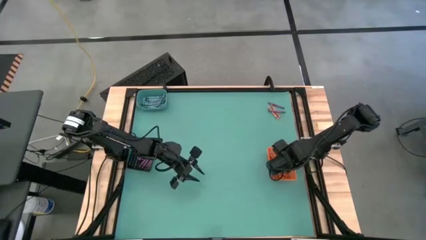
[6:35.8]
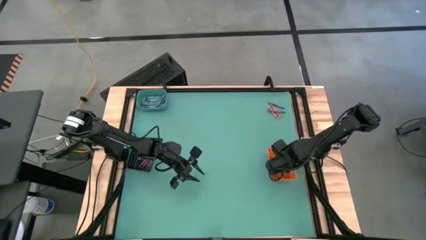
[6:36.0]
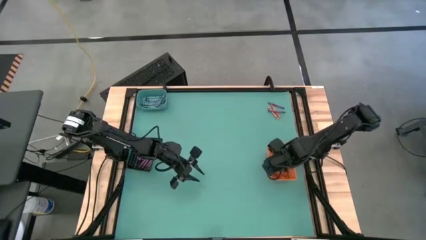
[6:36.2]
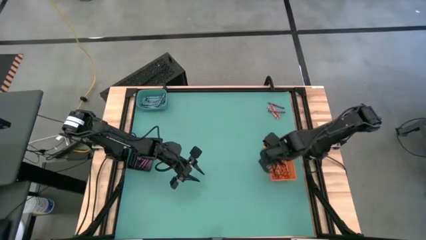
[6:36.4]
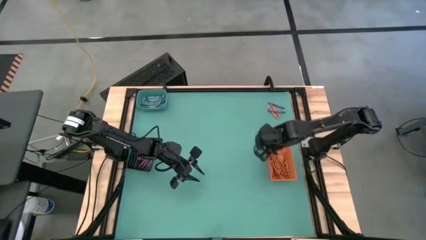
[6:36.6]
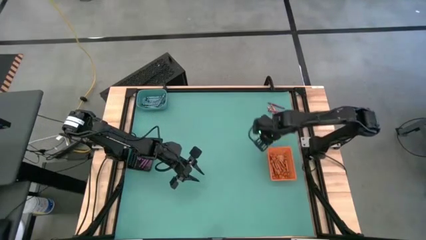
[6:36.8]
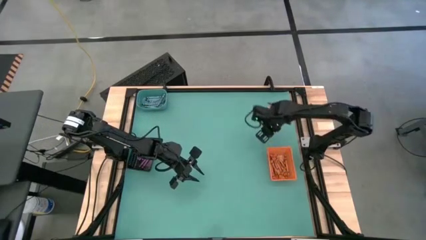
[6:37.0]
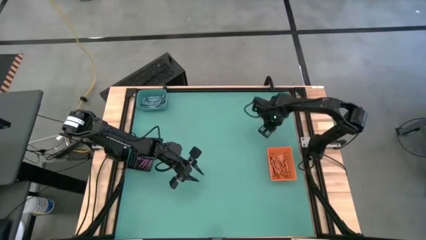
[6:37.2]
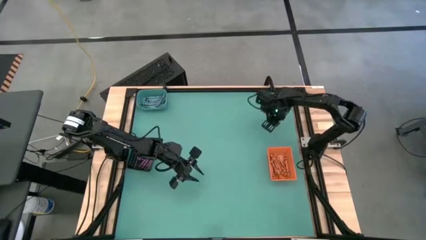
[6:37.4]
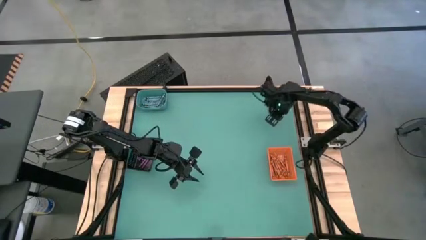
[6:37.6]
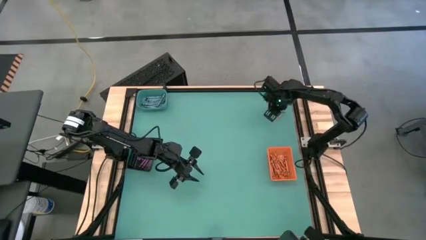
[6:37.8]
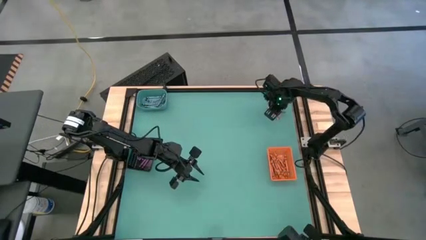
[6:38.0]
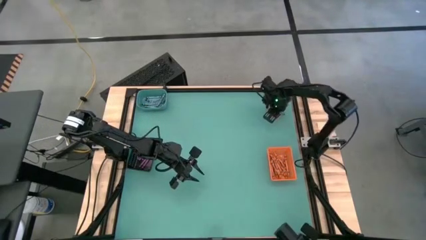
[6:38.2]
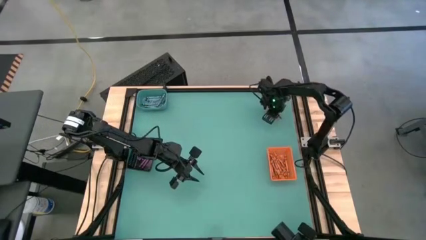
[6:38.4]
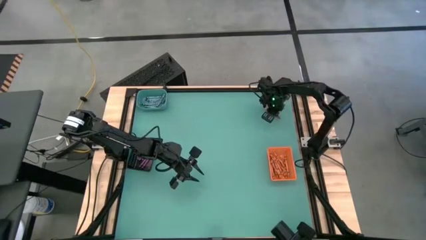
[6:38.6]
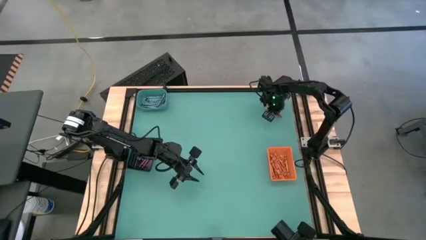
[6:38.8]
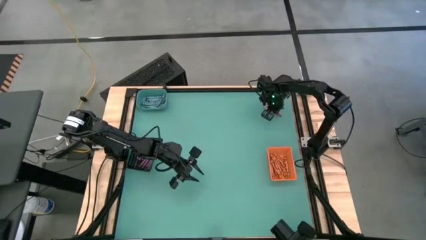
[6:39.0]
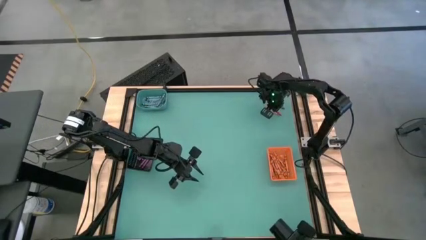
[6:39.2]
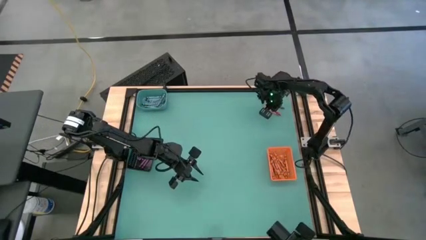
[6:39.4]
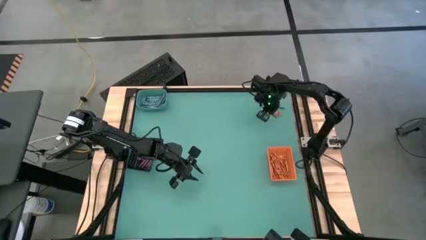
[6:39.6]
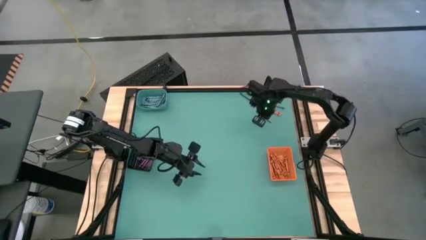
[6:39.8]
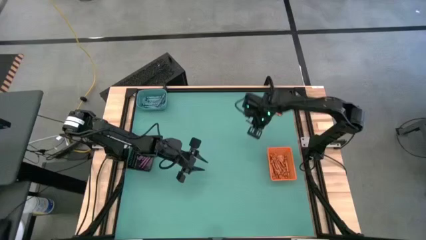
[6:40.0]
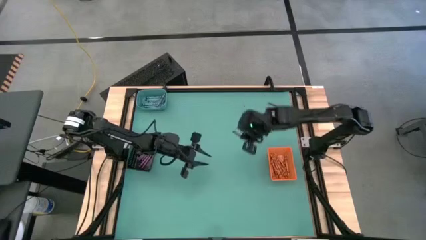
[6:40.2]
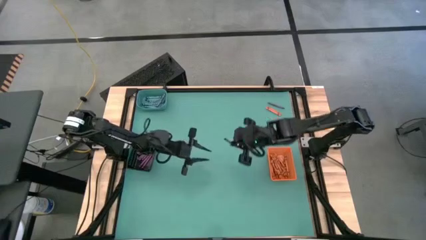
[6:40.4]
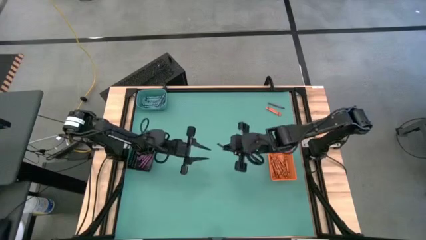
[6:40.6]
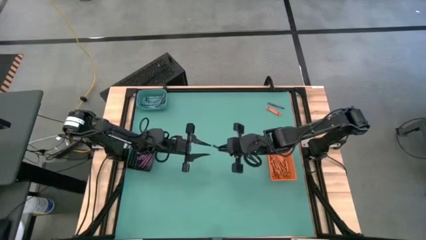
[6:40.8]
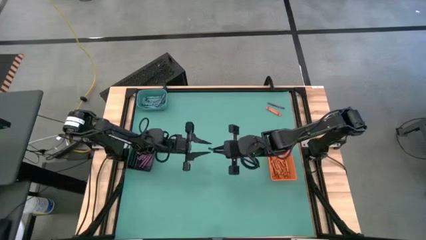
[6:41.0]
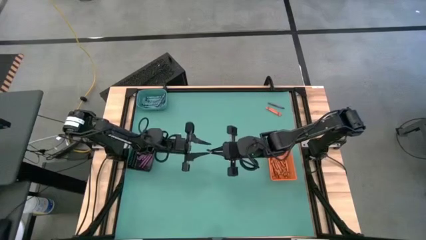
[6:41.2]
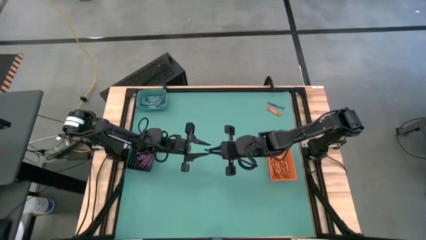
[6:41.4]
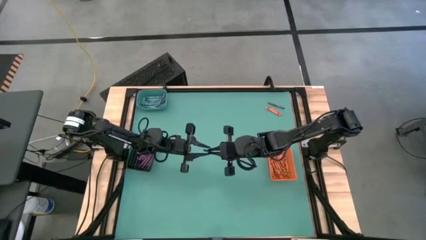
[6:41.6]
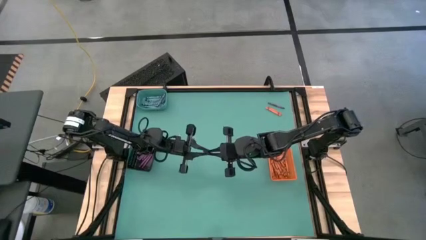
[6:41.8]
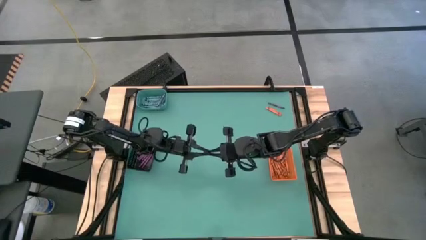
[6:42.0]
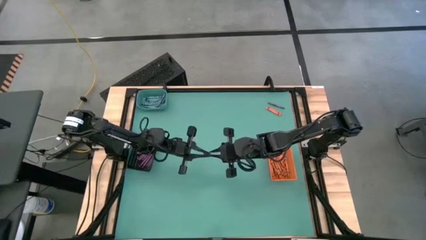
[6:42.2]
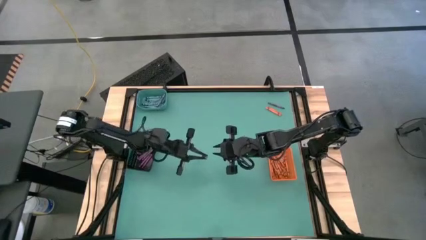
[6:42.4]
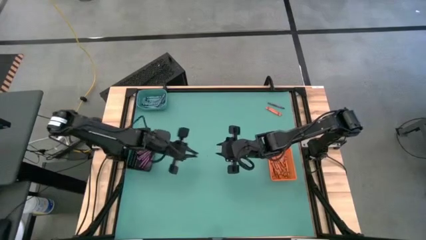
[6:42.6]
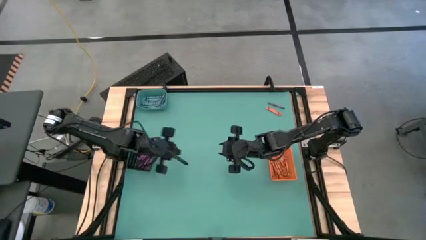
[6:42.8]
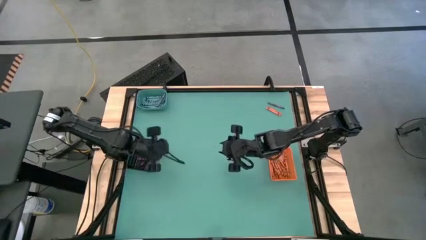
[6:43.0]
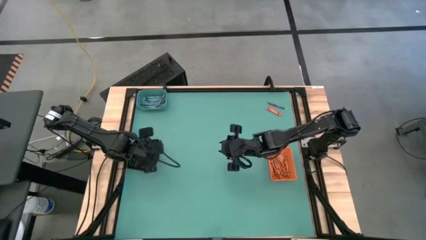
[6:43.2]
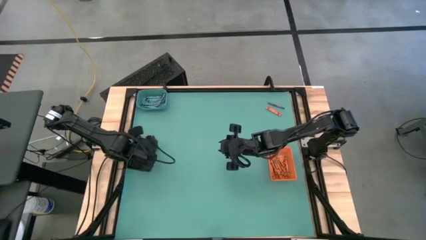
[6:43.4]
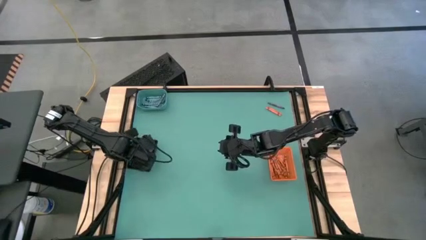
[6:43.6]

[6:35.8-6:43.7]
Task: Sort crayons
Put the purple crayon into the black bin

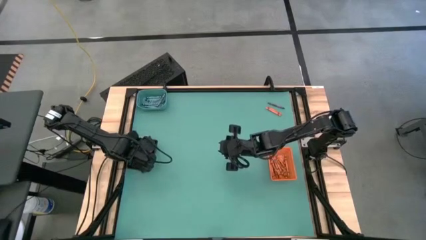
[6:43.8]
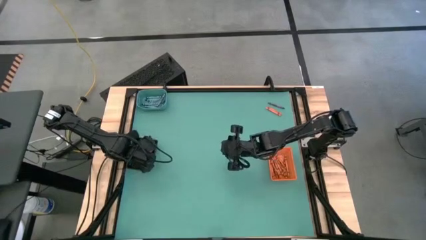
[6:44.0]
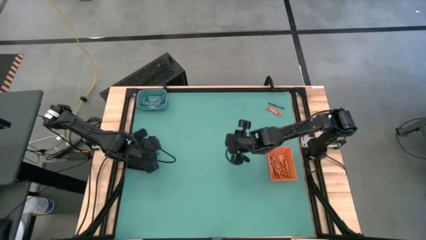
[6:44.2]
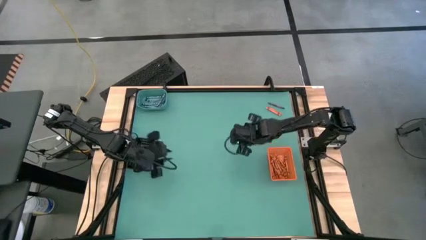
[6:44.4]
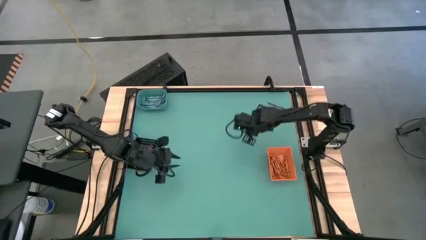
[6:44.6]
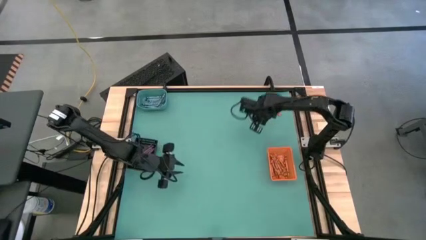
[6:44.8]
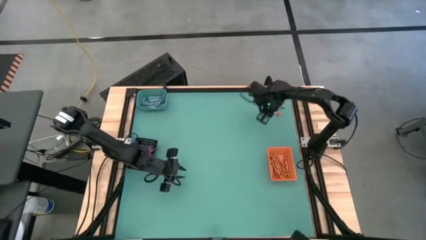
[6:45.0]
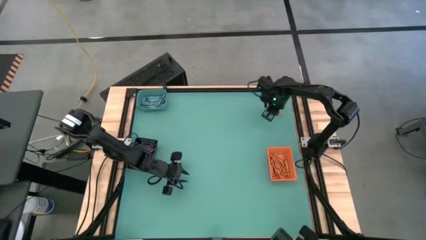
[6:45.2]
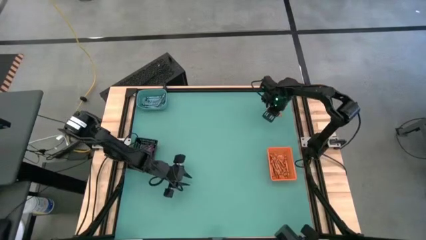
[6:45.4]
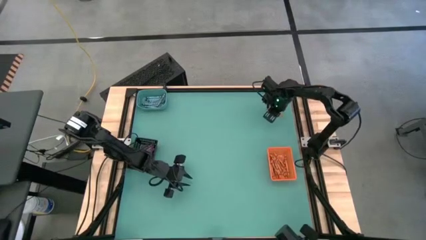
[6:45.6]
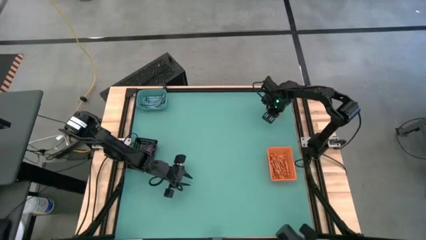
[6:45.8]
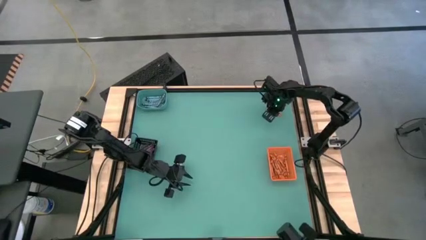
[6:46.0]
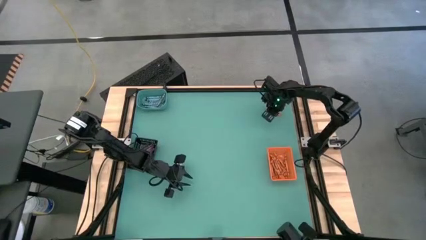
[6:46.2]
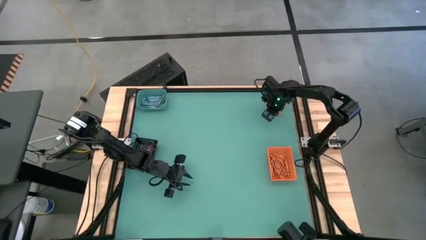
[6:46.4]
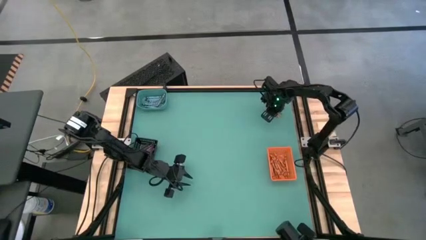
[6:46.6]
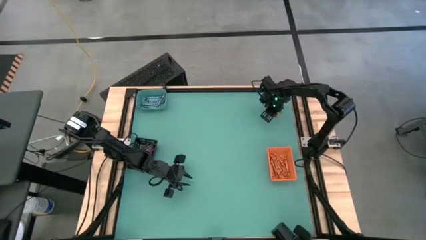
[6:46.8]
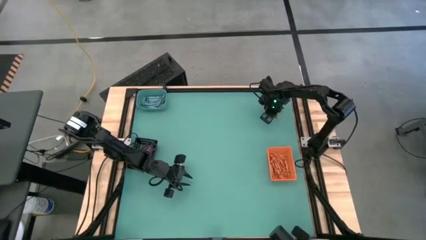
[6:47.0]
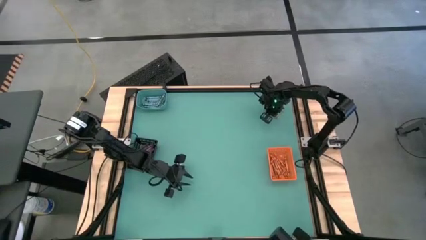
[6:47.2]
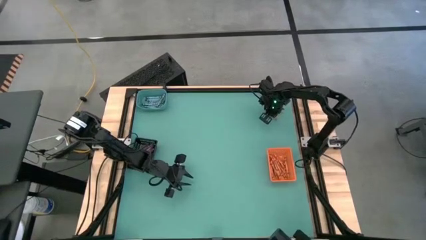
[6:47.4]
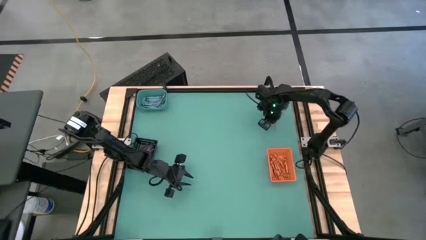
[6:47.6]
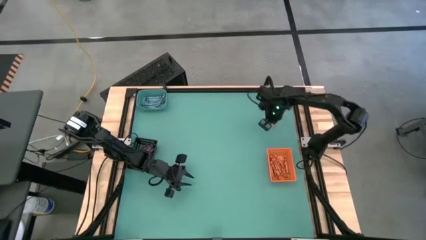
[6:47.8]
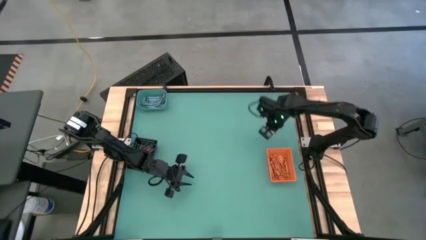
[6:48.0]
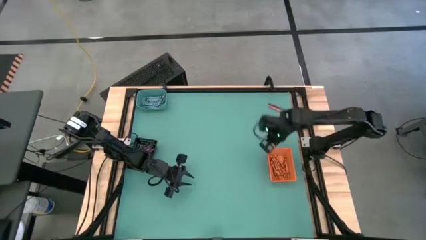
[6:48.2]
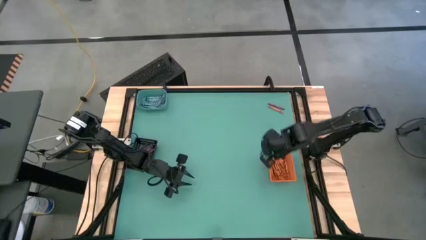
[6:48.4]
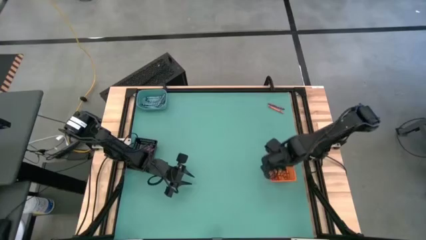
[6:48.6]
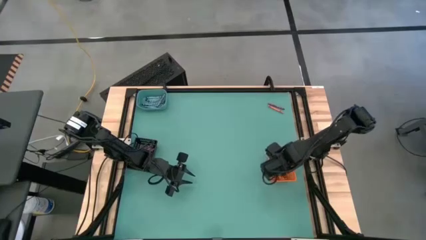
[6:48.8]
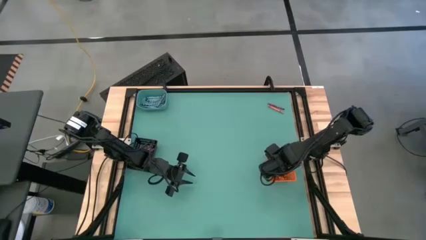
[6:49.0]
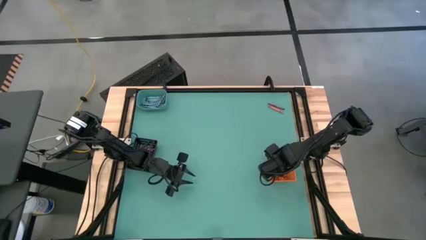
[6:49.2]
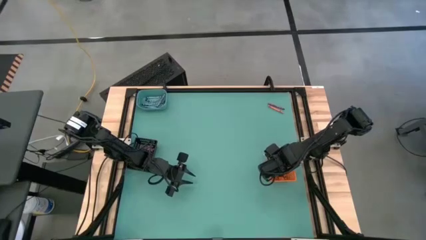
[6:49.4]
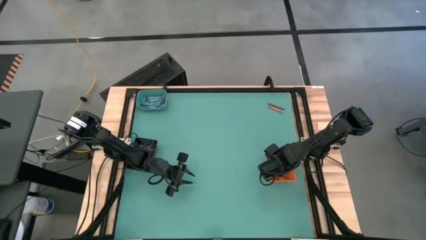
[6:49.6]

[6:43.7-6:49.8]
Put the orange crayon into the orange bin

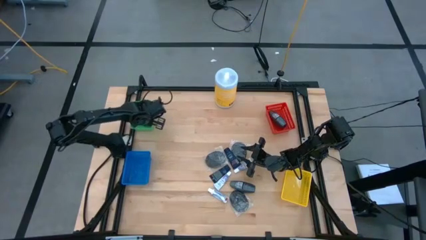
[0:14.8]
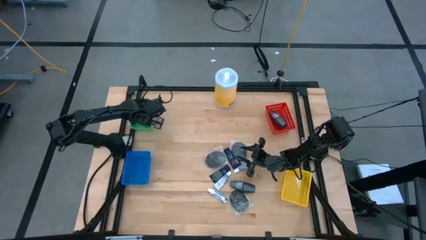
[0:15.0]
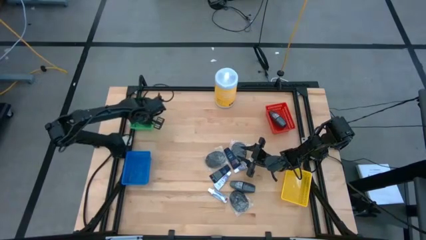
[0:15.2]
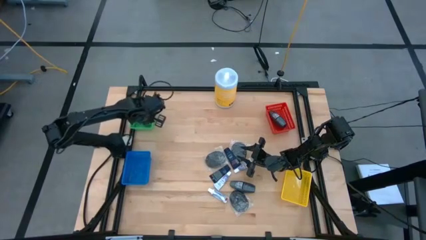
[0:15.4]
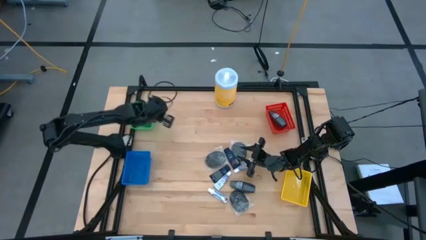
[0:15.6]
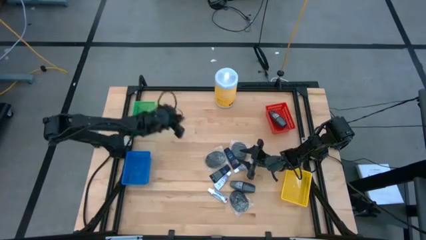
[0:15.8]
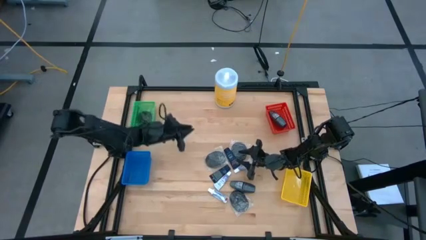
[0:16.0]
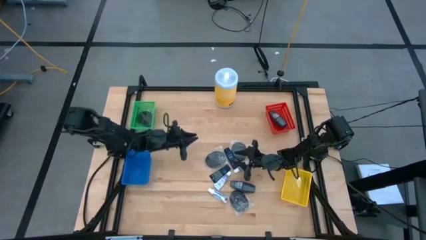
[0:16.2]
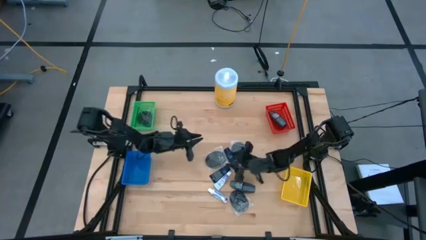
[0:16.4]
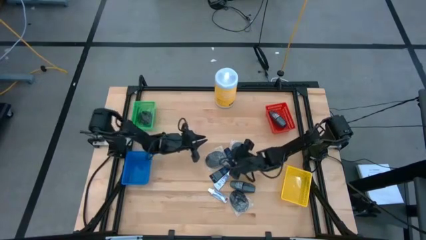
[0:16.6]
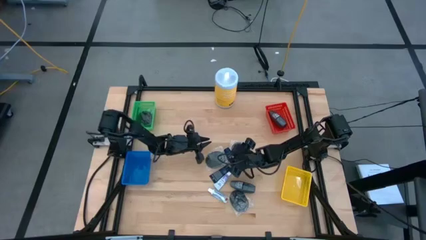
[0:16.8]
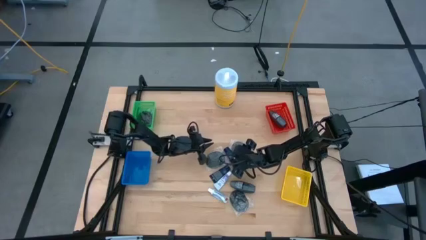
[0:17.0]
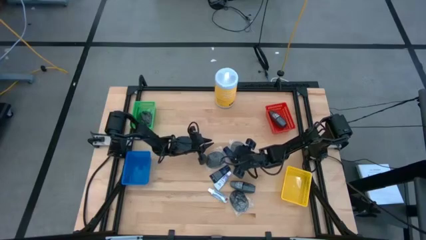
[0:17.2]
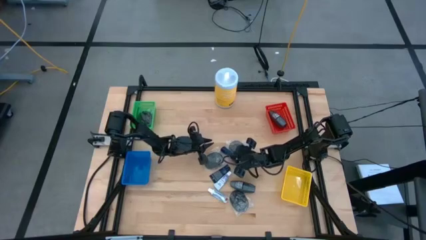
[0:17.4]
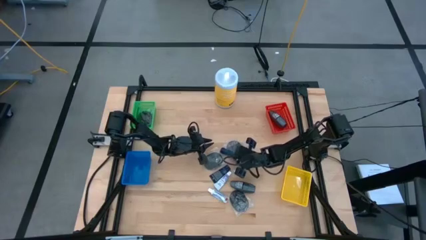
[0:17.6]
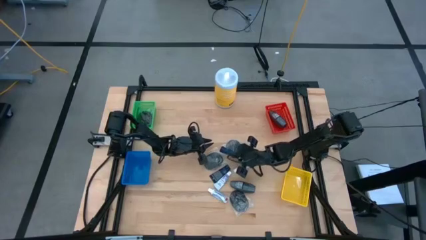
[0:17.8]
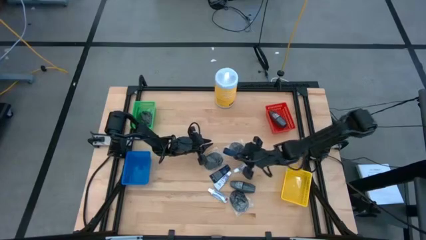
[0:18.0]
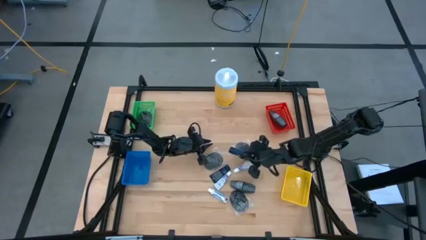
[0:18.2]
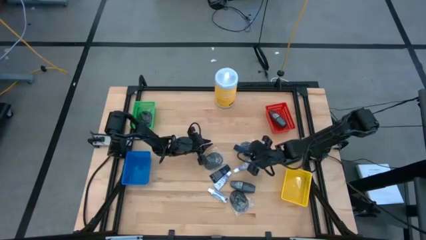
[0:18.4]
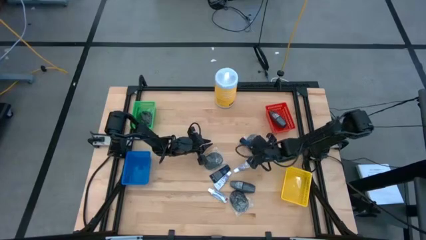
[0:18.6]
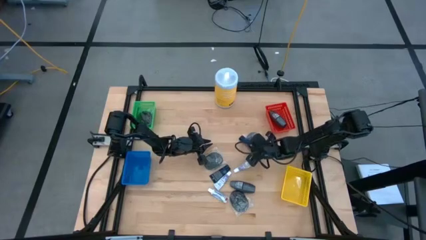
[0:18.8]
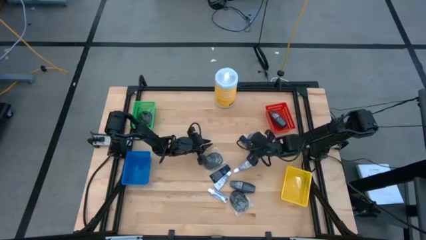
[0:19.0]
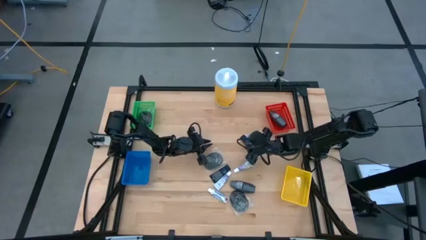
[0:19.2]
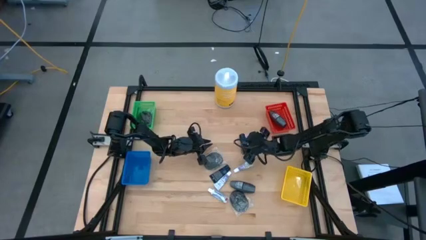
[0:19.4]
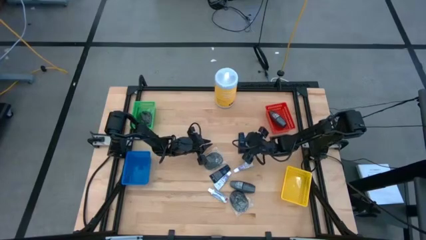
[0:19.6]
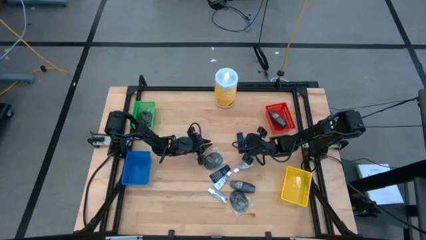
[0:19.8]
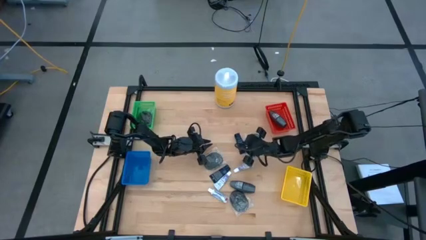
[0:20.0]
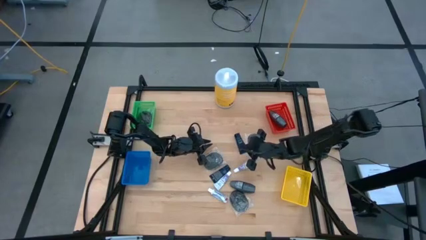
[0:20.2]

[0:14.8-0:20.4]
Task: Pick & Place Travel size toiletries
Put the shaving cream into the yellow bin
